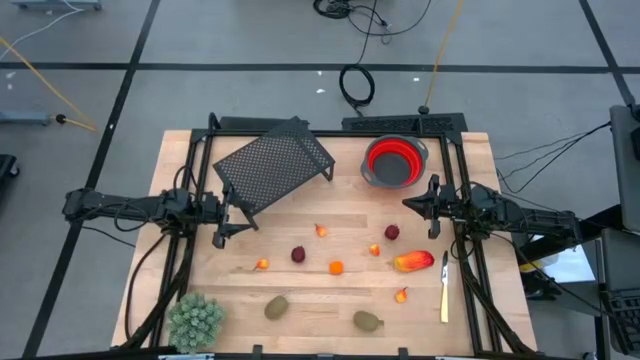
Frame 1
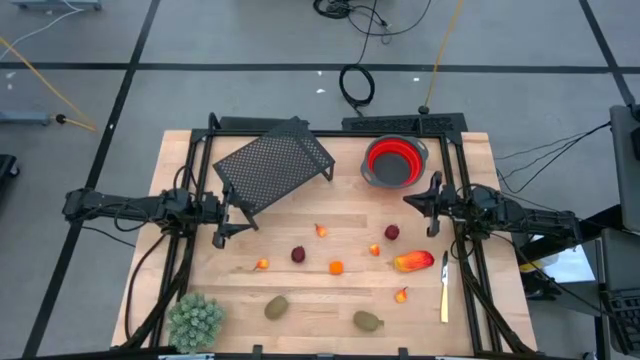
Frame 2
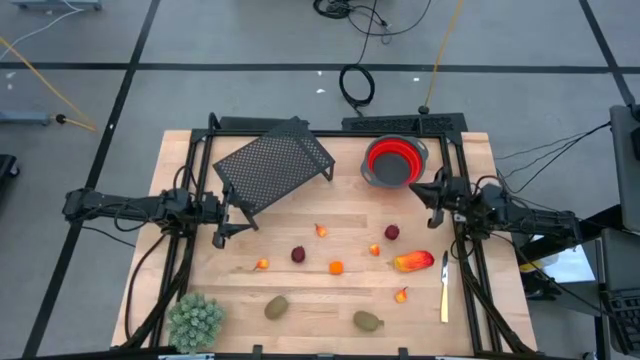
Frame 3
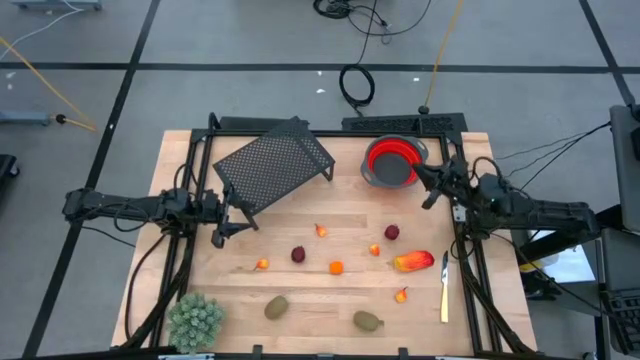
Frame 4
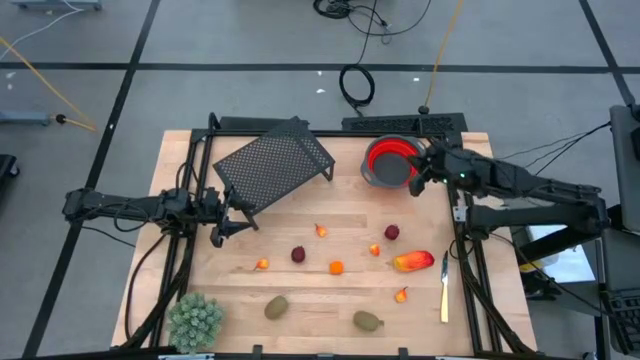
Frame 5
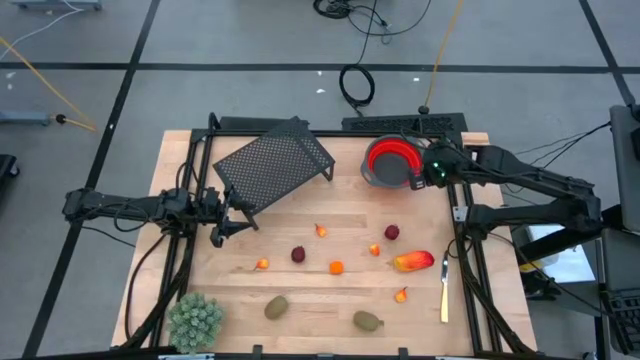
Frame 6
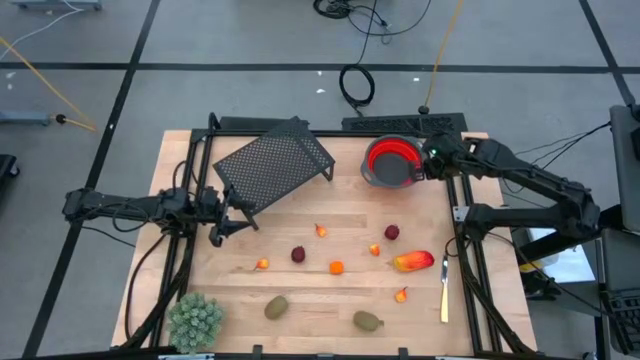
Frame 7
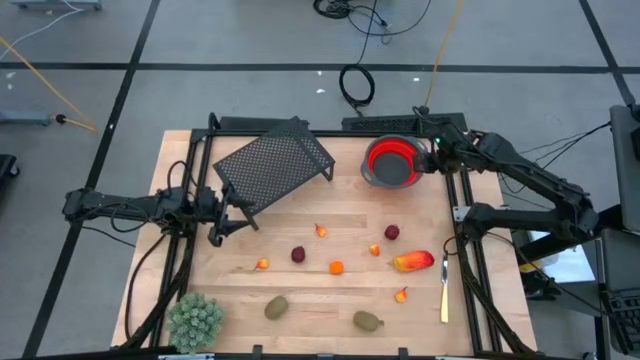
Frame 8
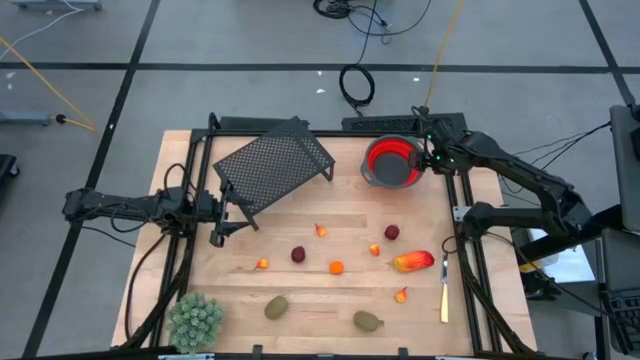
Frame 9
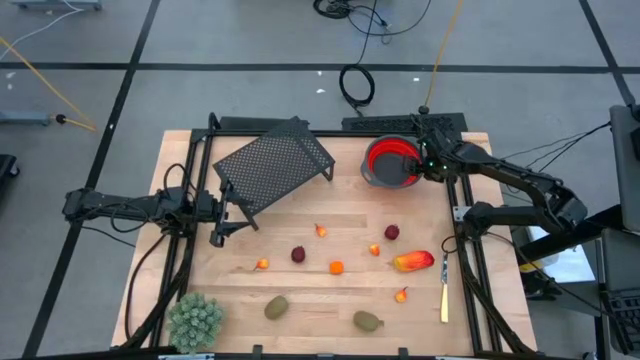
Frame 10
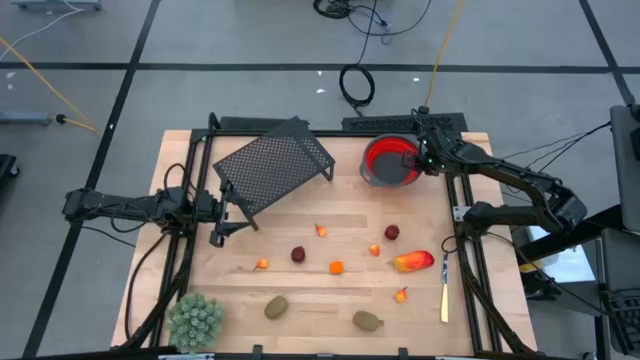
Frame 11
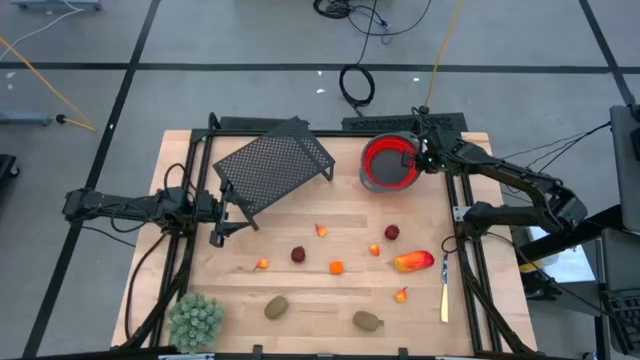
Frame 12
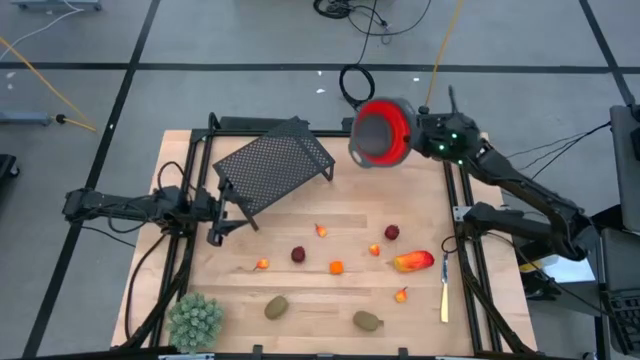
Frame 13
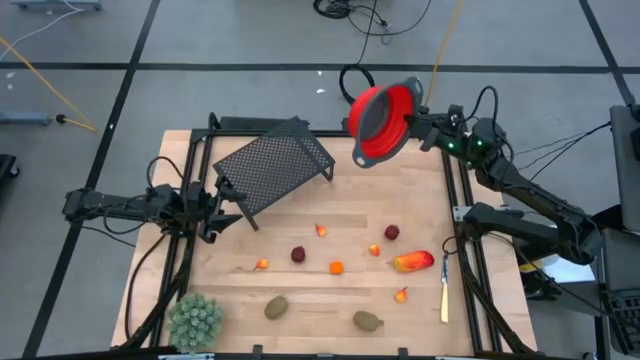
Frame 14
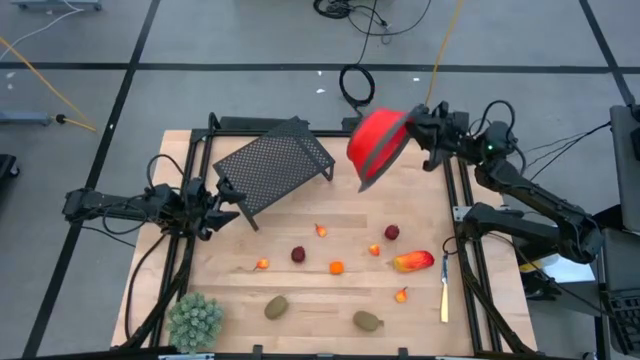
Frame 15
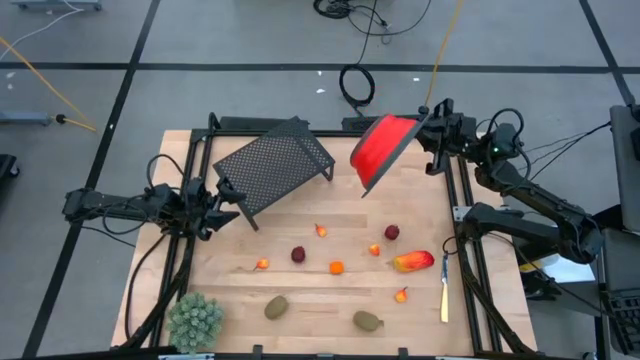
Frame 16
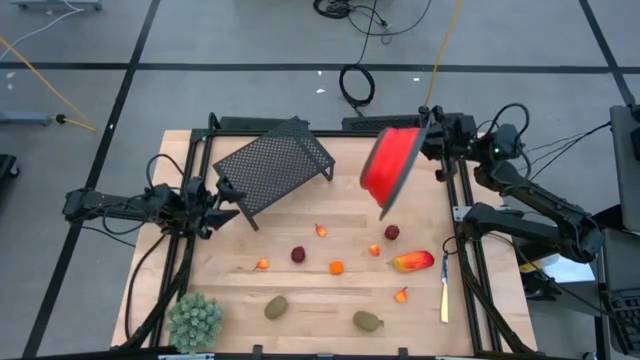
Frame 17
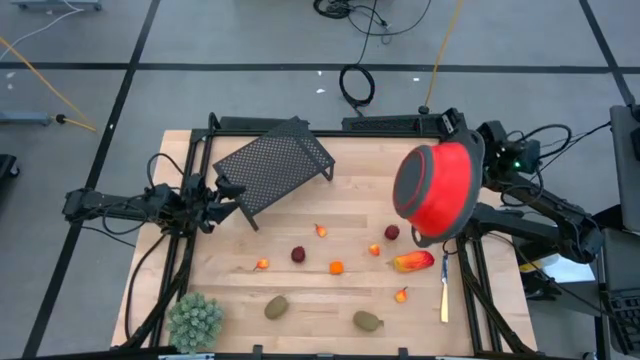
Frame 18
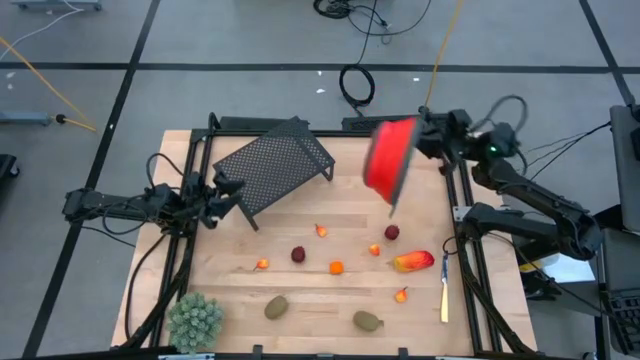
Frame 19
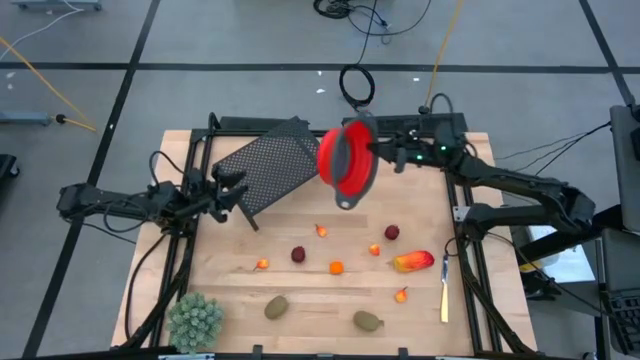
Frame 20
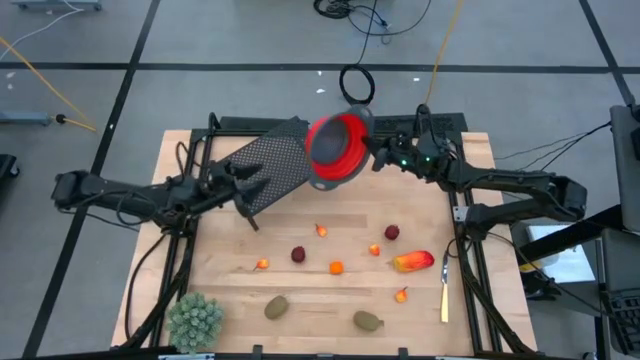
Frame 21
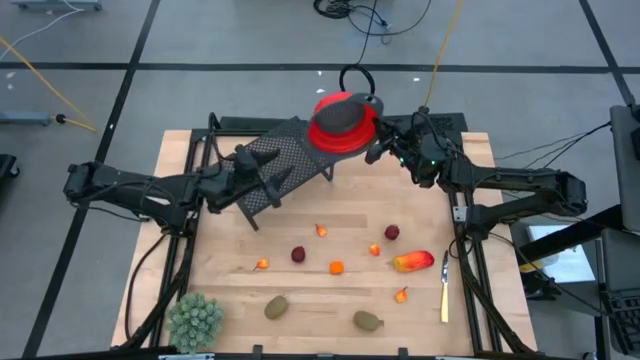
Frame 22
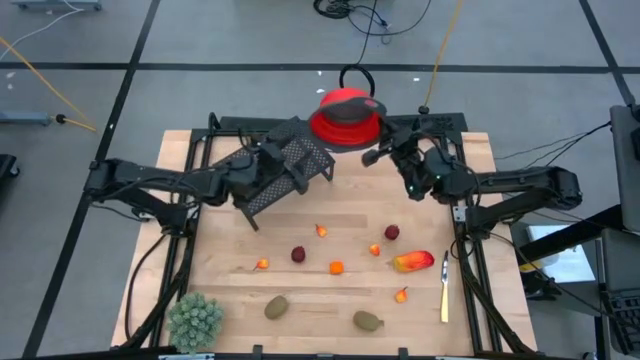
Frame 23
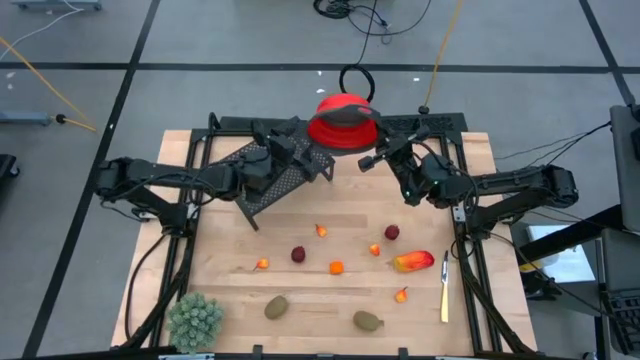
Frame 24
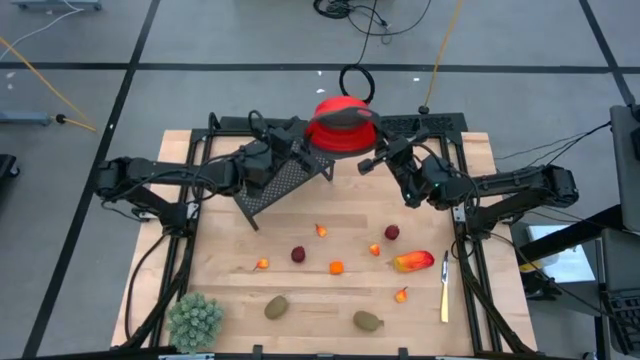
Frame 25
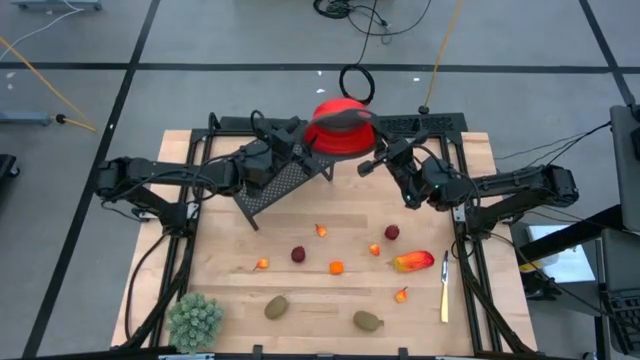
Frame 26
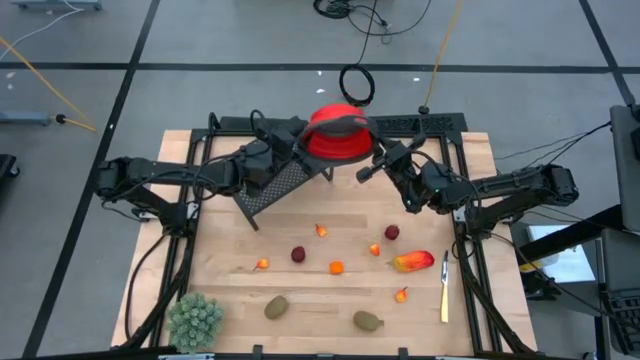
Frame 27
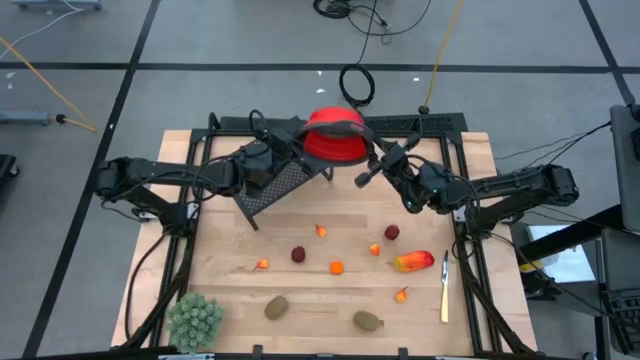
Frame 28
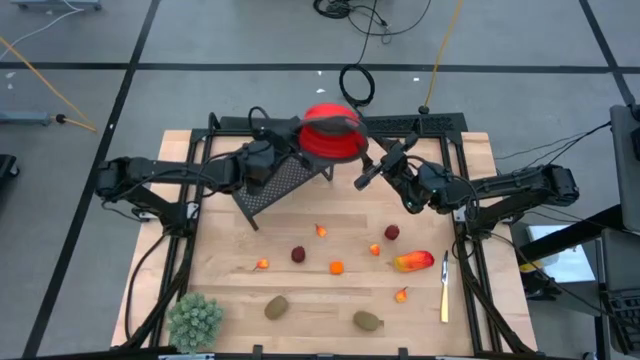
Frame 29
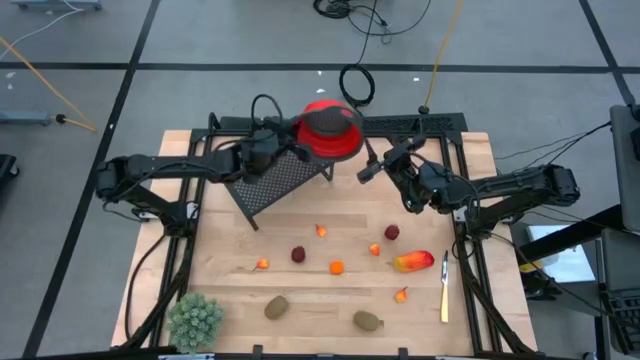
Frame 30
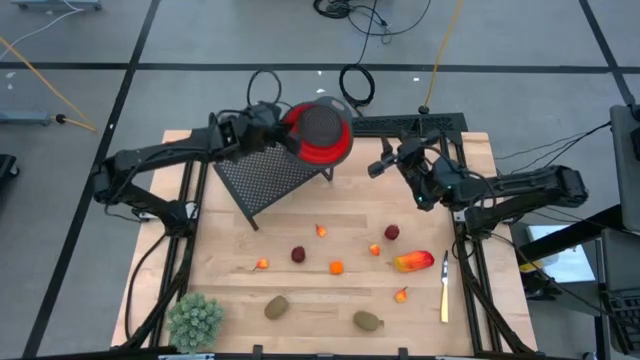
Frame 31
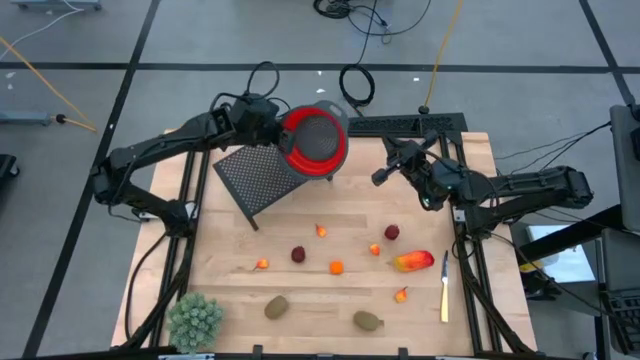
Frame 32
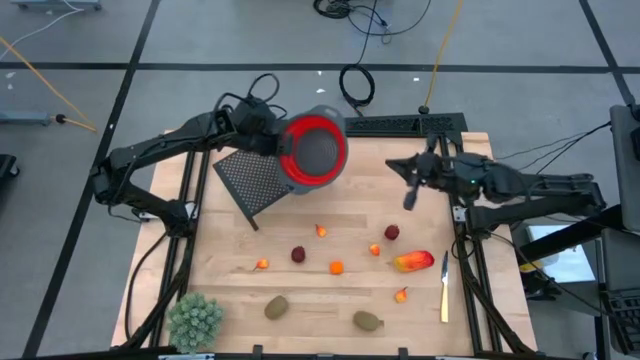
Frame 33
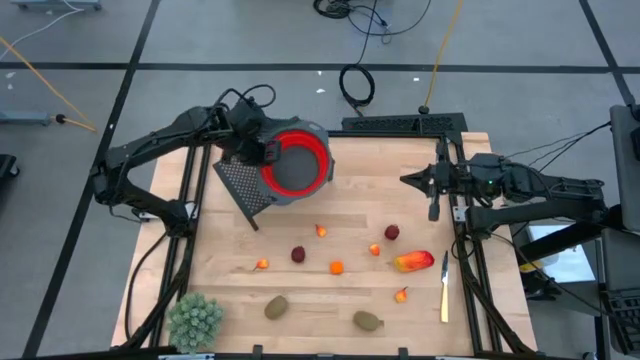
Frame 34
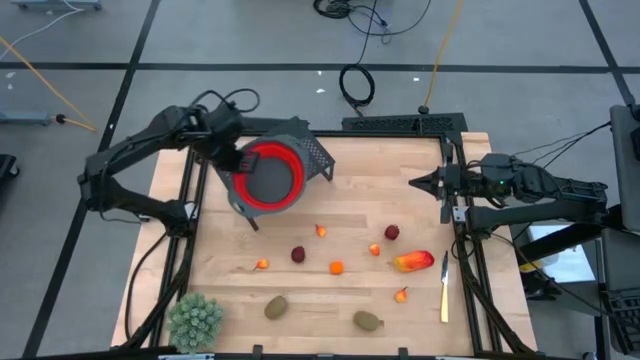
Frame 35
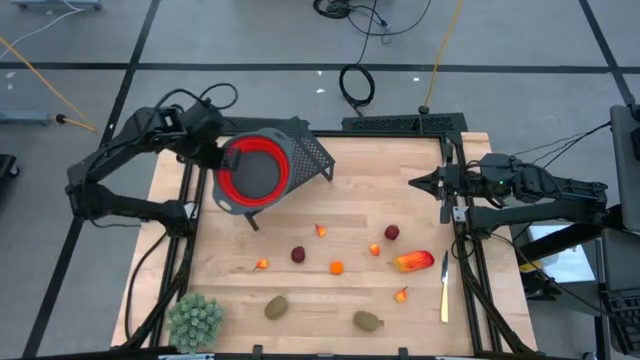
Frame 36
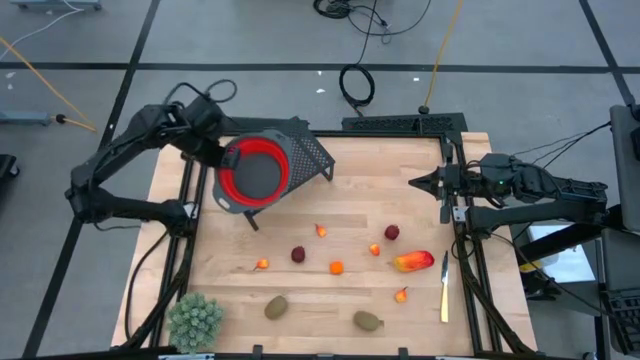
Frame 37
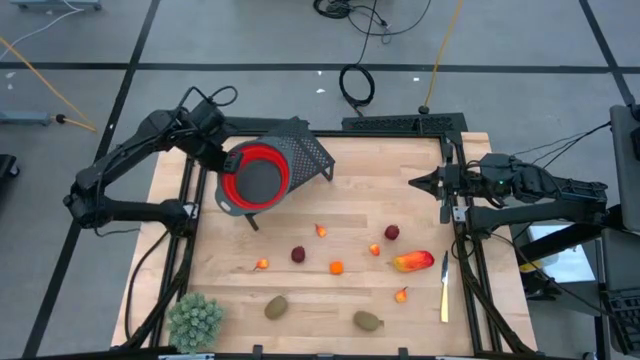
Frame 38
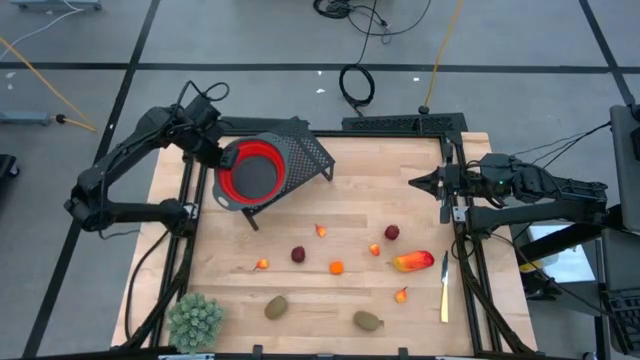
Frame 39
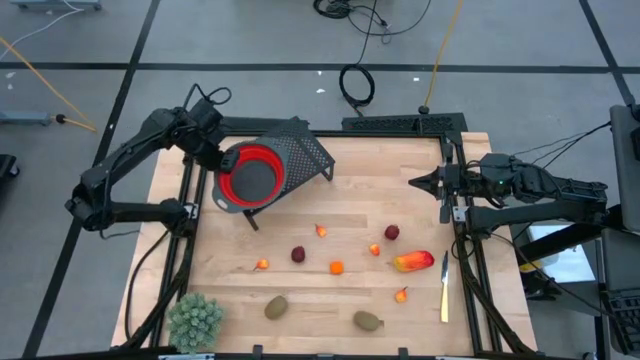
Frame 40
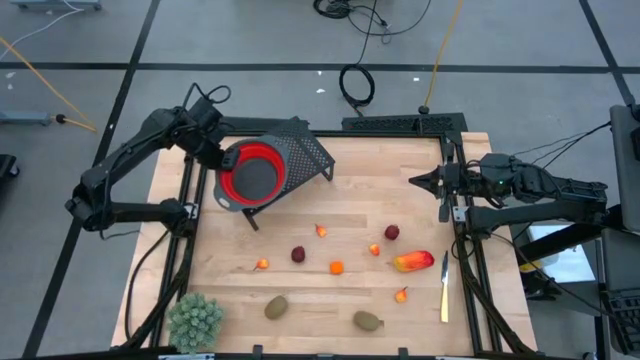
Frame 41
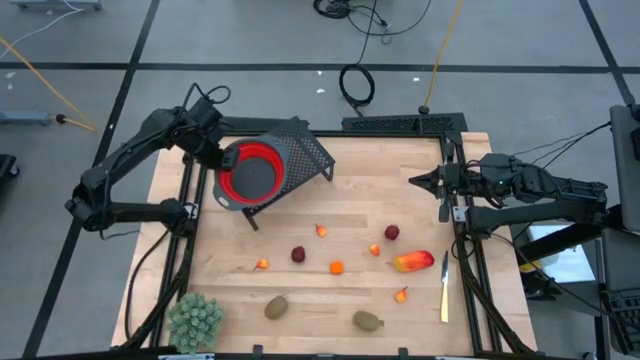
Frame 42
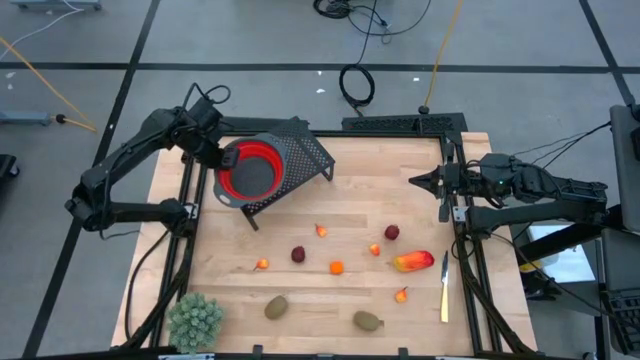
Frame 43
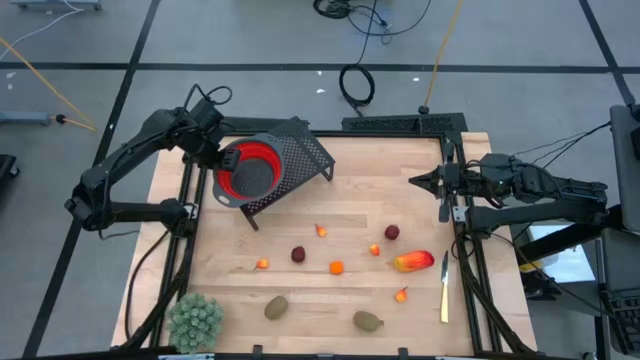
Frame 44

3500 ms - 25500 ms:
Task: Pick & Place Fruit
Put the red strainer bowl on the shelf
